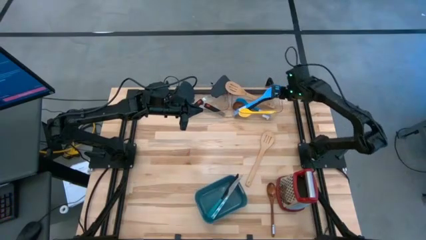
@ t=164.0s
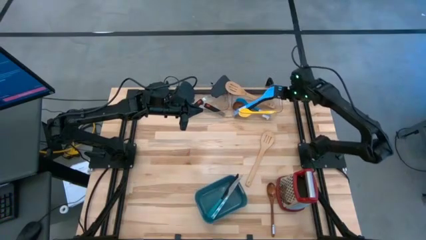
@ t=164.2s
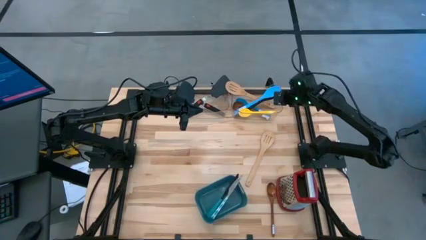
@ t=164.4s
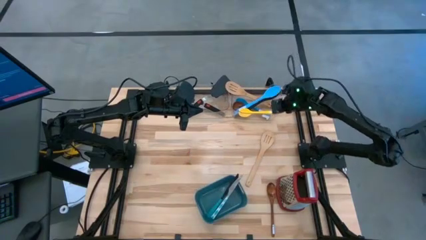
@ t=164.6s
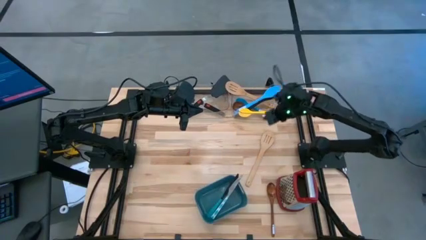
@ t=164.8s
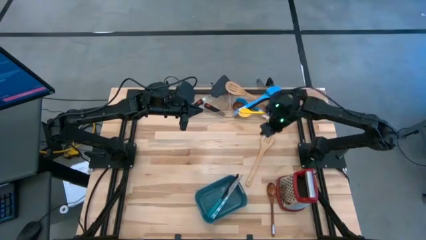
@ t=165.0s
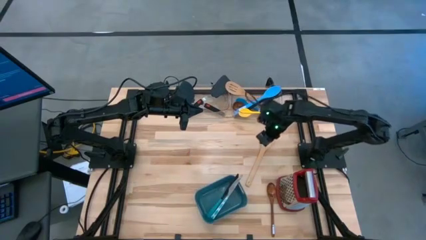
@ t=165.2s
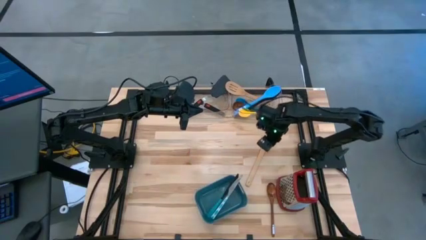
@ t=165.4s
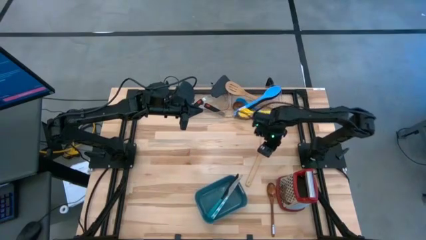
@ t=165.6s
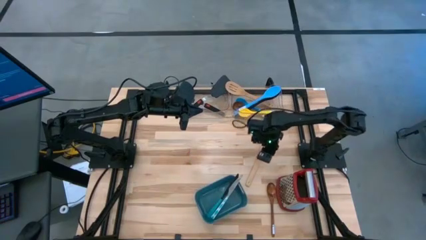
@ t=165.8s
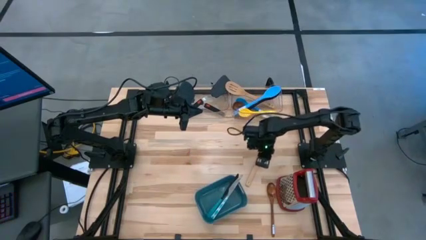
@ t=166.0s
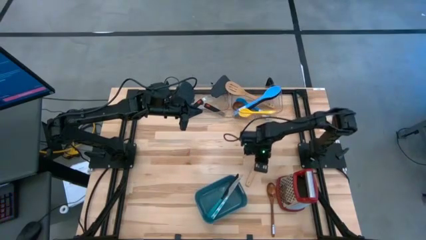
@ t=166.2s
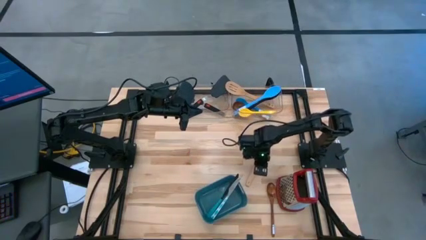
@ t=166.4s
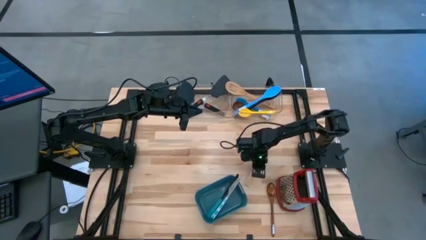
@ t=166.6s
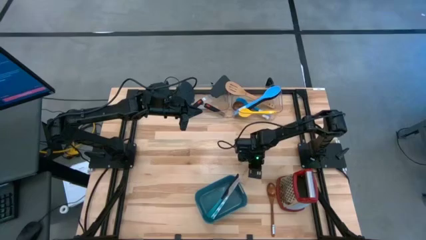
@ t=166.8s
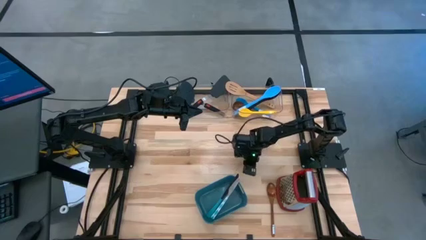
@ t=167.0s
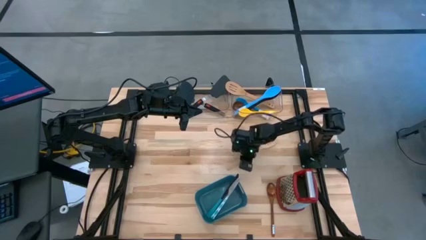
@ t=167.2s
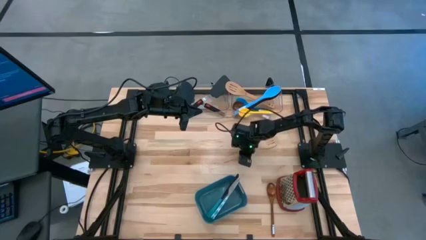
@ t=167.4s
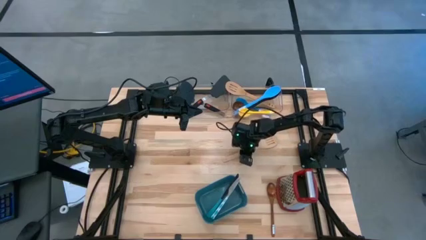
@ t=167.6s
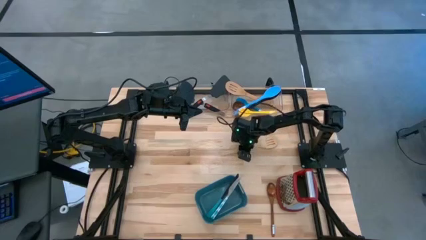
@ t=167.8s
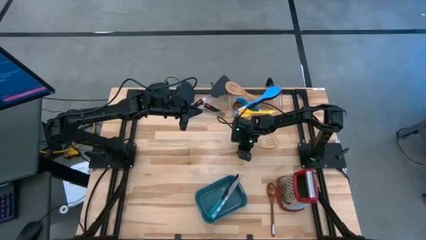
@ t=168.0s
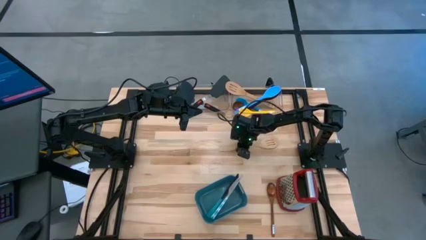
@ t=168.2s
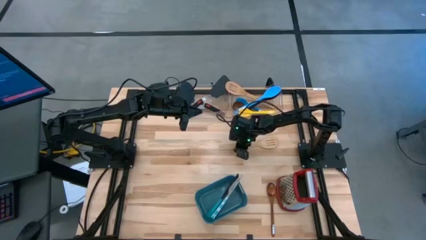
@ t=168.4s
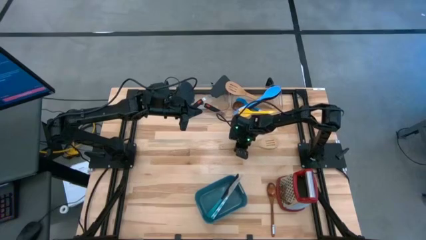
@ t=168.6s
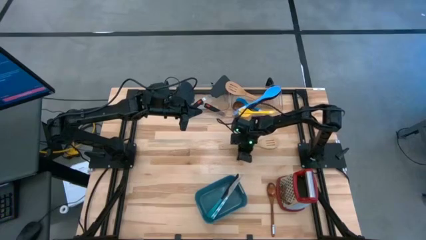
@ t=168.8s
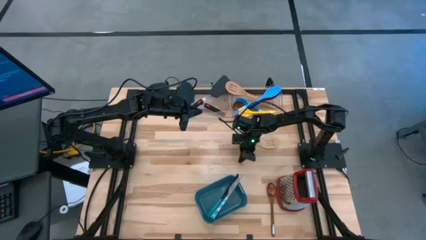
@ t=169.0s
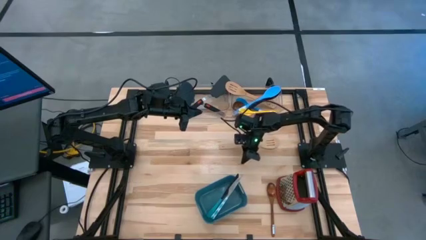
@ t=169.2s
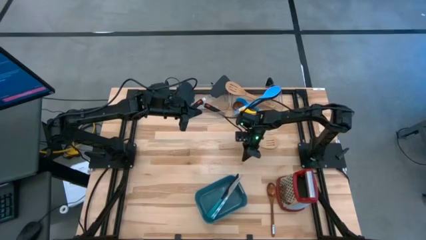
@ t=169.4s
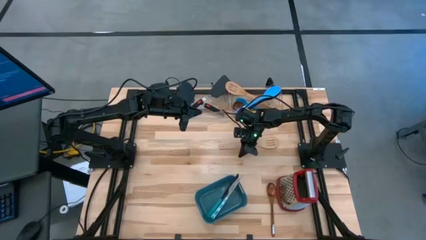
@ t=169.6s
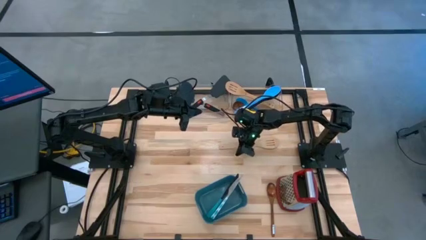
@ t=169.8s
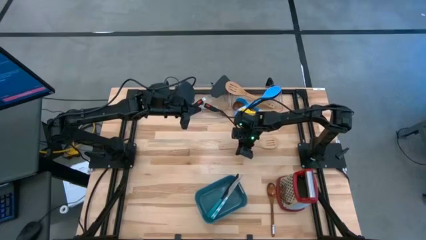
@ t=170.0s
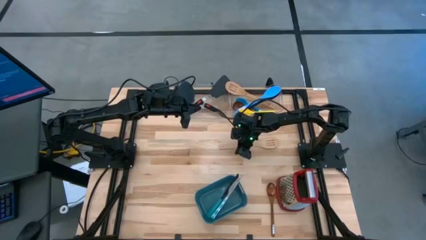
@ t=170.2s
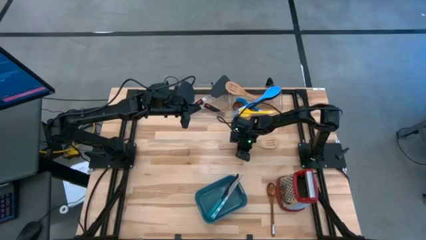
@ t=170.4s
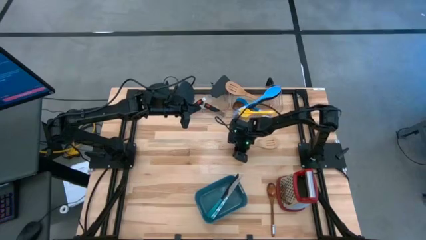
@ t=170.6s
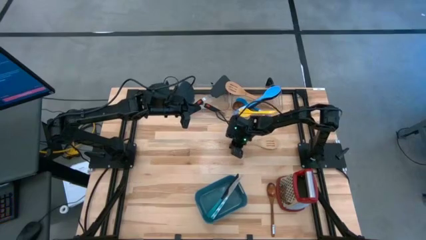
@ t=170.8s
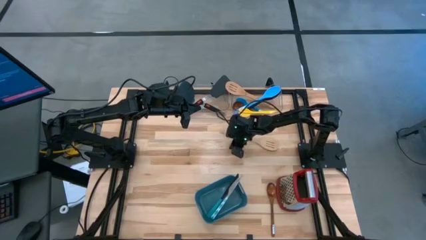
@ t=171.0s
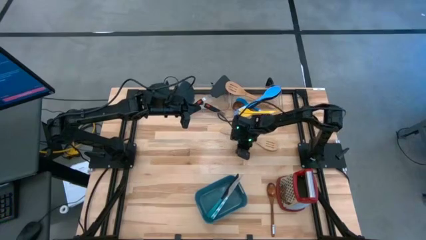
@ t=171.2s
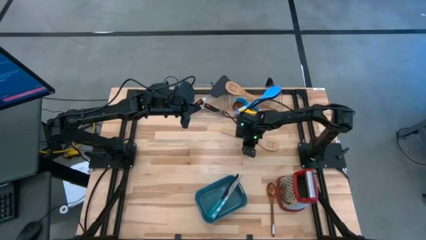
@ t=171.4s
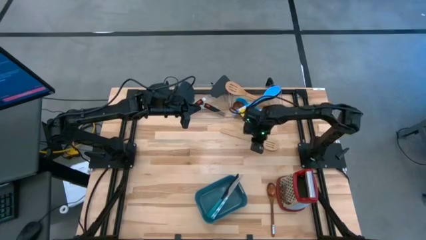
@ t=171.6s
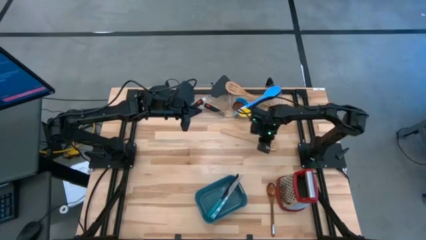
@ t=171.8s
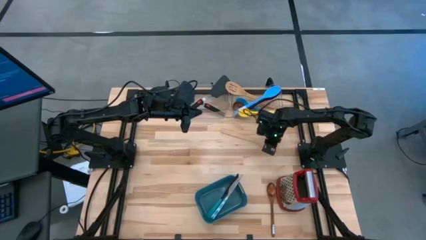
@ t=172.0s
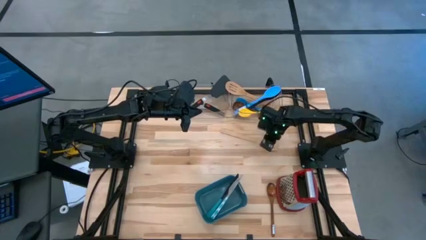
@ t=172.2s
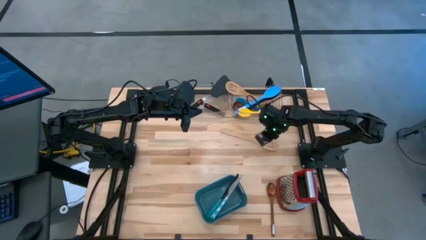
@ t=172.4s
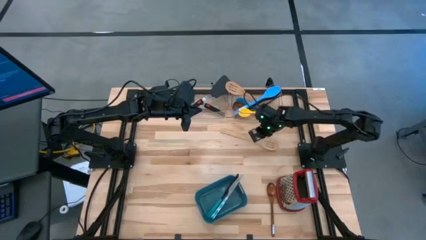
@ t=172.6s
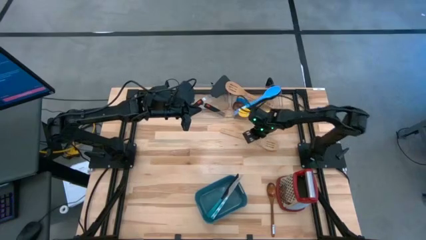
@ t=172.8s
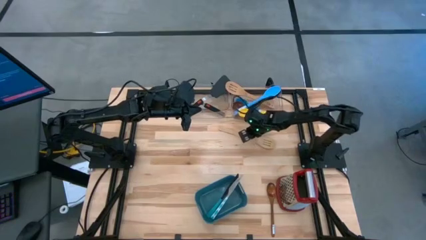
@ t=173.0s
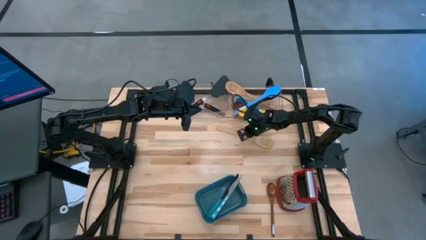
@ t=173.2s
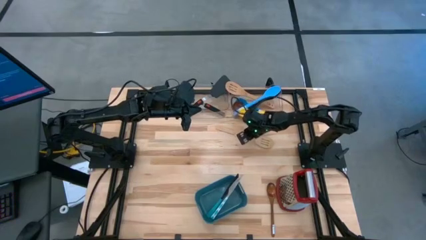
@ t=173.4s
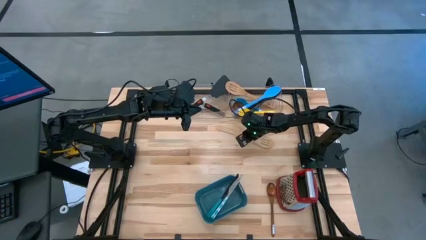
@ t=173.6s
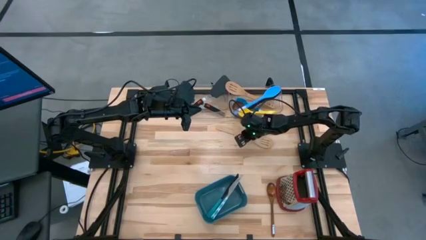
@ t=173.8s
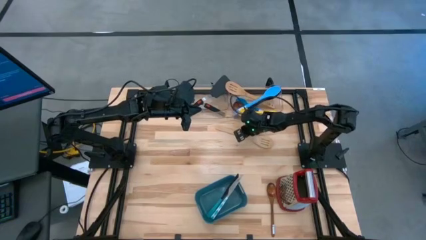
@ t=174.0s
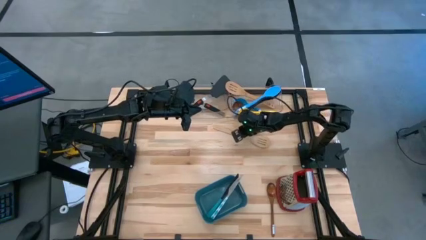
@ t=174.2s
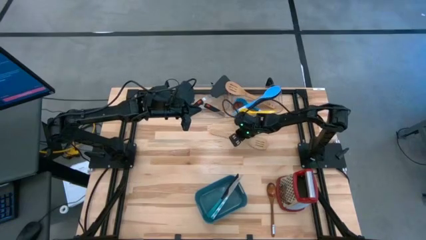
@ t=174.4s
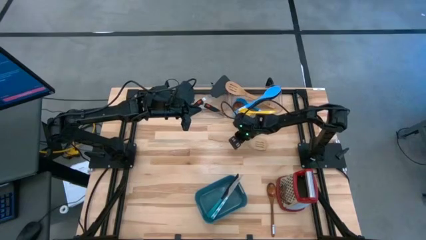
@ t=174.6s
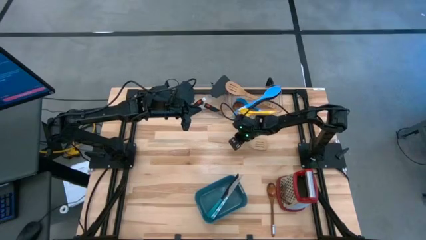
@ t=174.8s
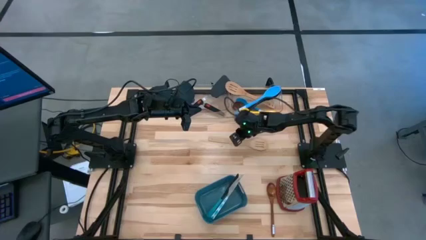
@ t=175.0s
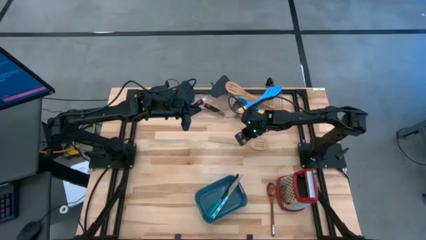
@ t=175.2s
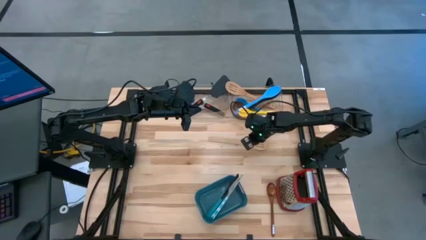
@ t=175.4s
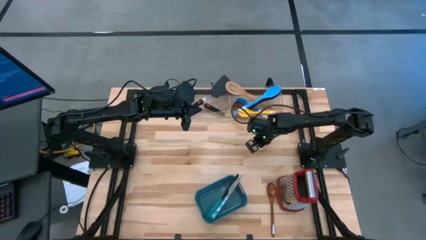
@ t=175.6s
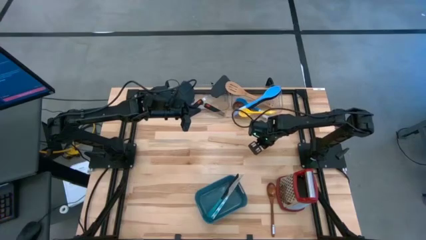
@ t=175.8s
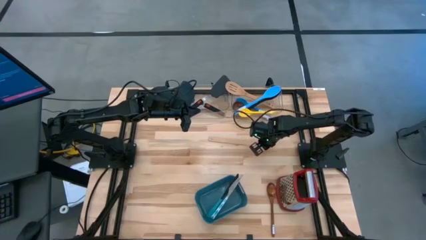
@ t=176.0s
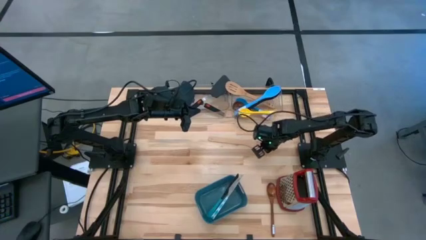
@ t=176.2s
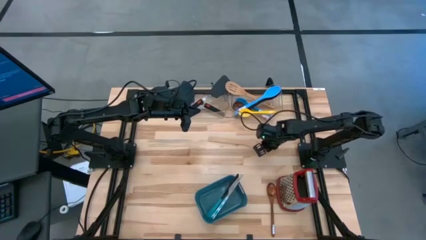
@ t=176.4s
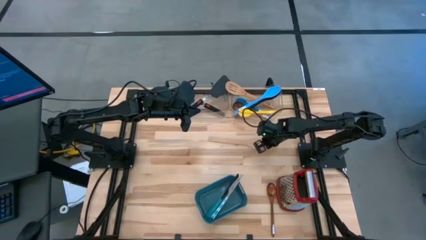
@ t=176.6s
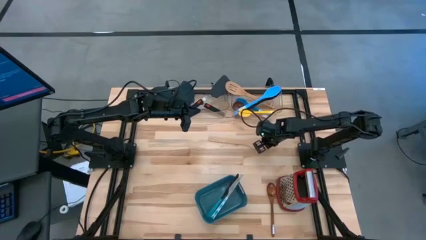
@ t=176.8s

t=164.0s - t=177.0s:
Task: Pick & Place Kitchen Items
Put the wooden slotted spatula into the top right transparent bin
